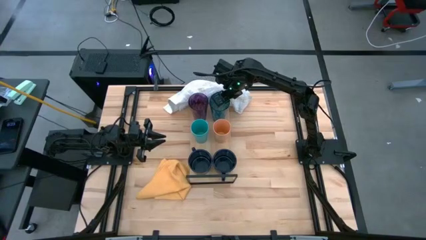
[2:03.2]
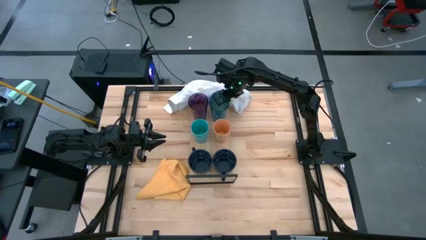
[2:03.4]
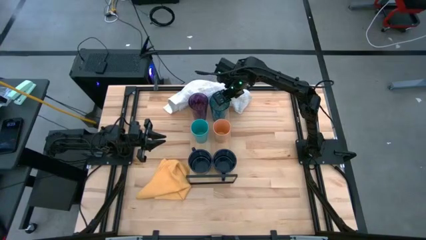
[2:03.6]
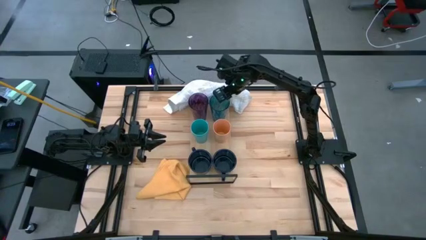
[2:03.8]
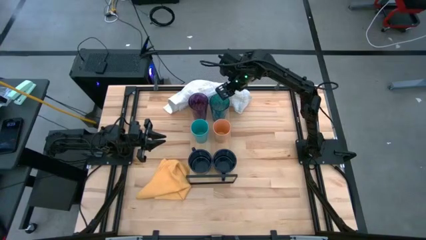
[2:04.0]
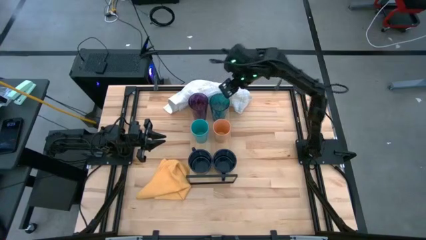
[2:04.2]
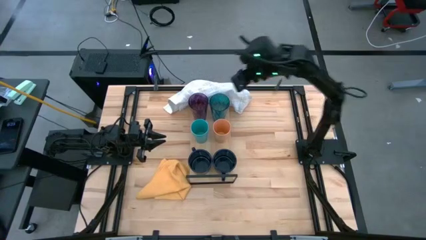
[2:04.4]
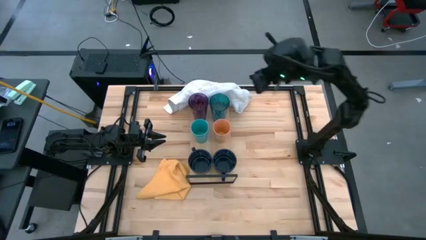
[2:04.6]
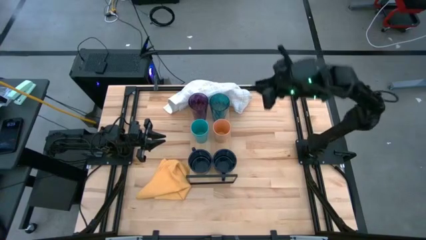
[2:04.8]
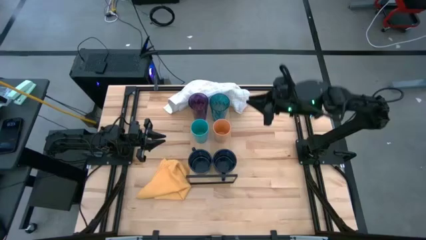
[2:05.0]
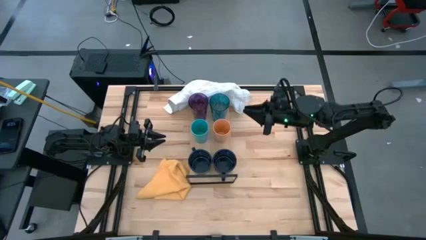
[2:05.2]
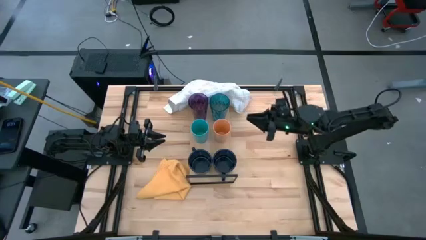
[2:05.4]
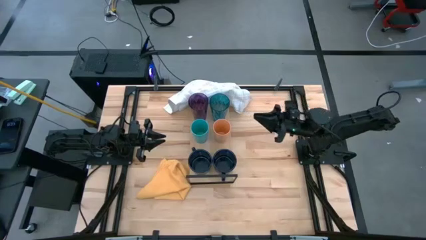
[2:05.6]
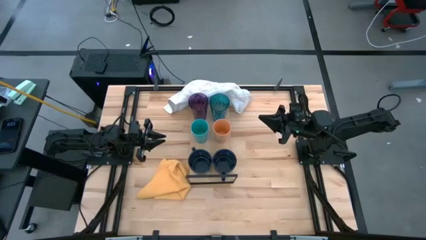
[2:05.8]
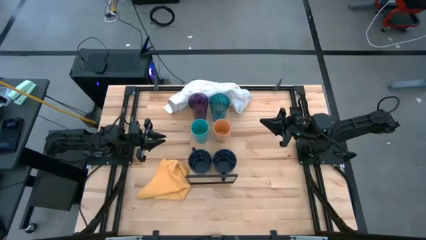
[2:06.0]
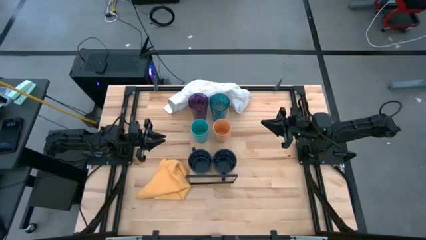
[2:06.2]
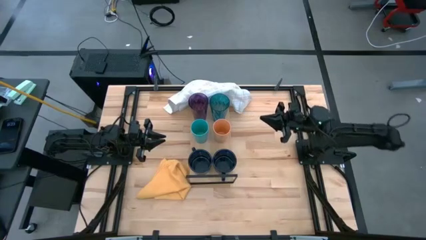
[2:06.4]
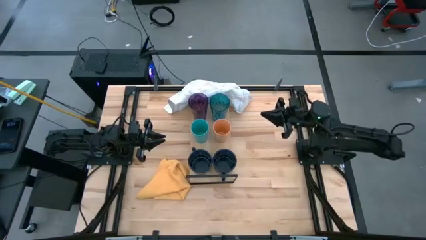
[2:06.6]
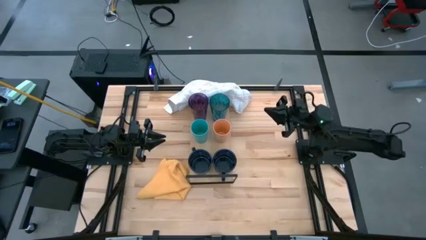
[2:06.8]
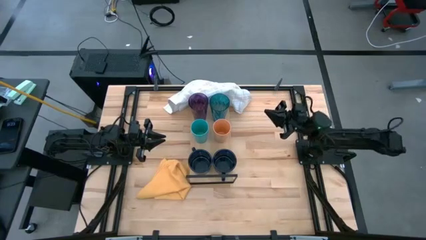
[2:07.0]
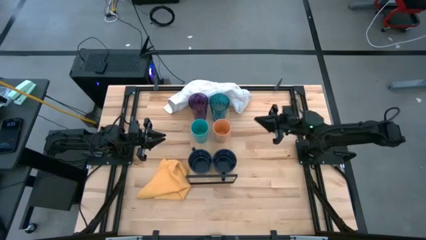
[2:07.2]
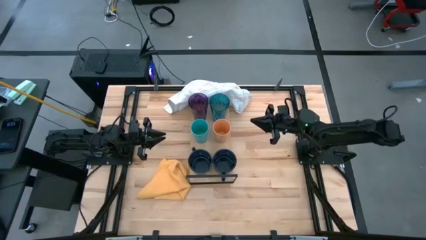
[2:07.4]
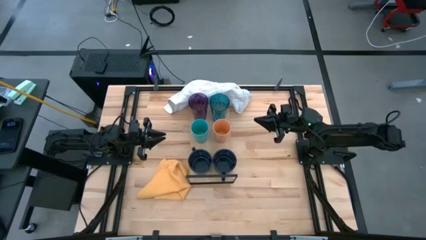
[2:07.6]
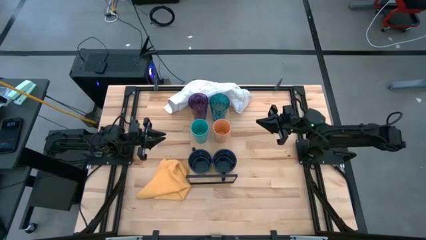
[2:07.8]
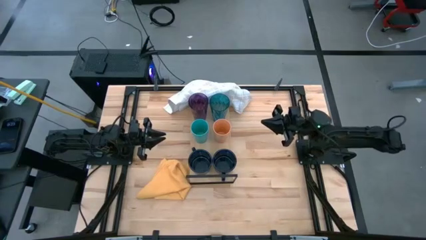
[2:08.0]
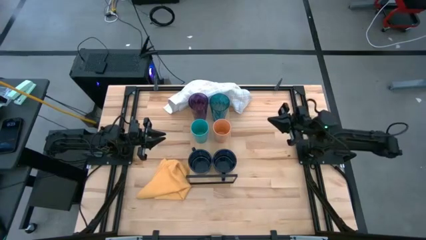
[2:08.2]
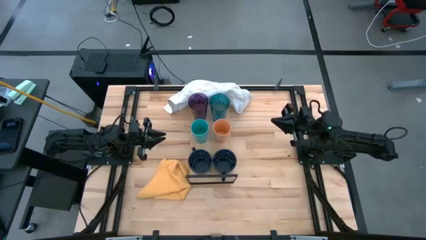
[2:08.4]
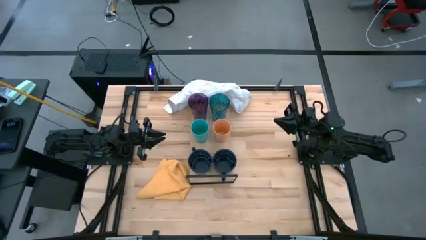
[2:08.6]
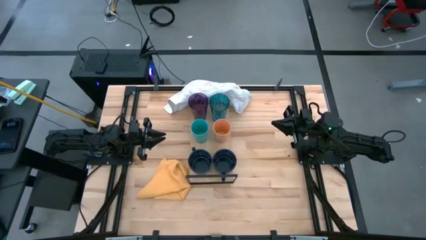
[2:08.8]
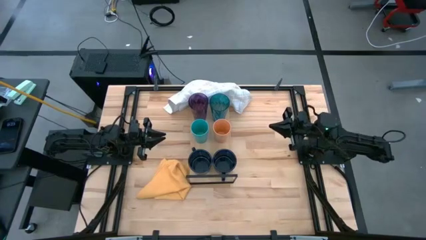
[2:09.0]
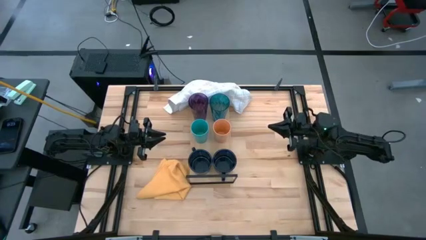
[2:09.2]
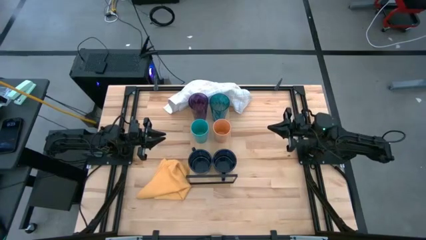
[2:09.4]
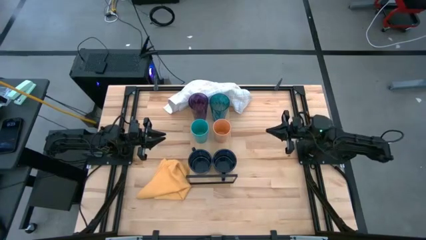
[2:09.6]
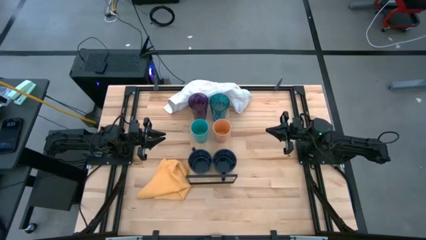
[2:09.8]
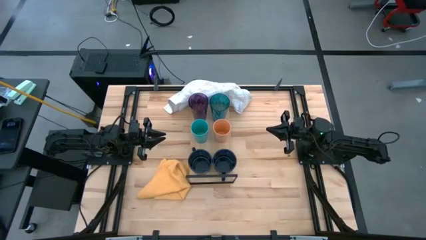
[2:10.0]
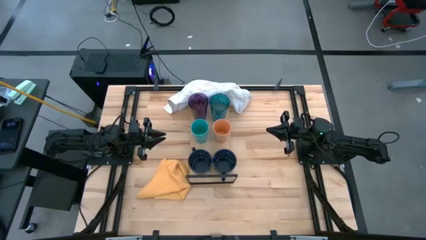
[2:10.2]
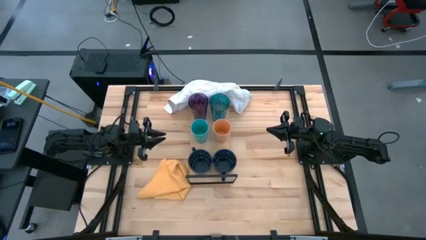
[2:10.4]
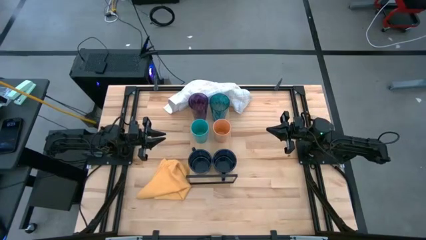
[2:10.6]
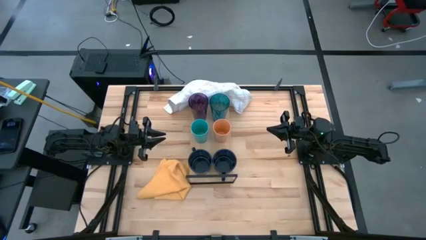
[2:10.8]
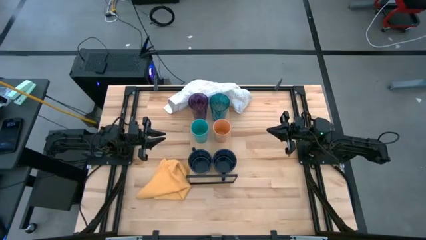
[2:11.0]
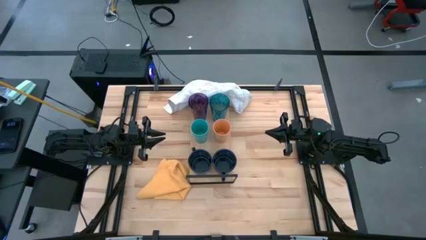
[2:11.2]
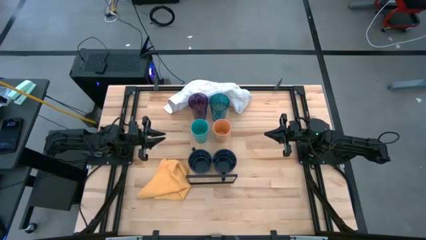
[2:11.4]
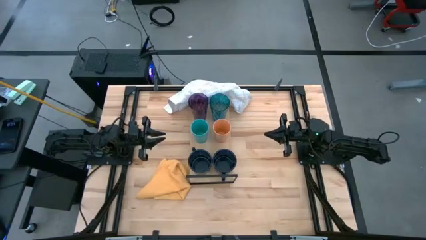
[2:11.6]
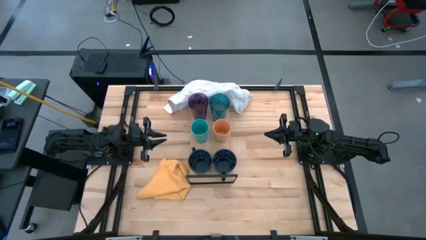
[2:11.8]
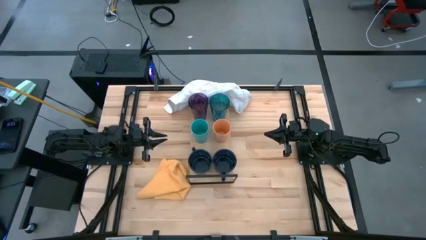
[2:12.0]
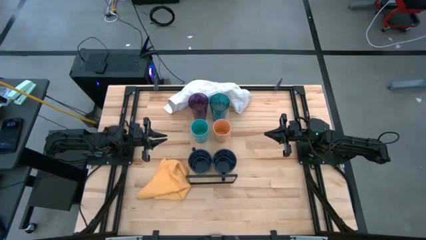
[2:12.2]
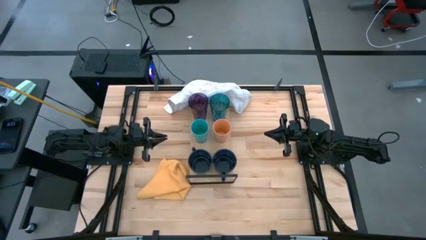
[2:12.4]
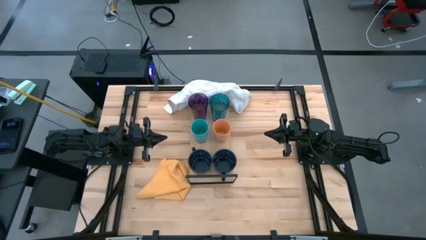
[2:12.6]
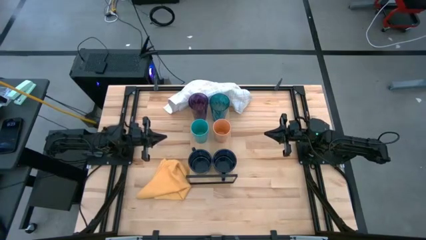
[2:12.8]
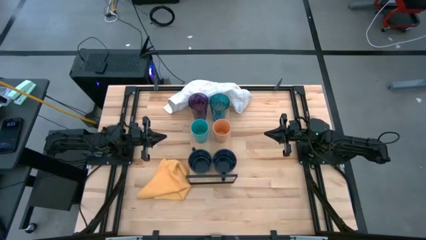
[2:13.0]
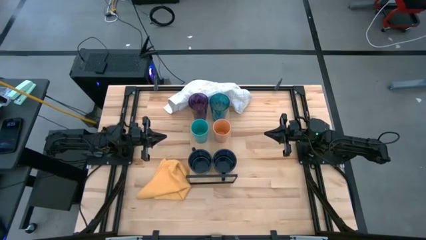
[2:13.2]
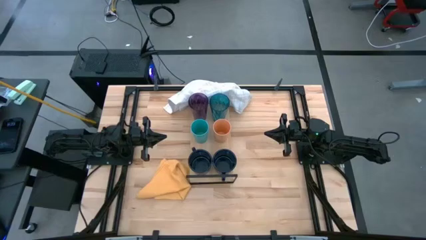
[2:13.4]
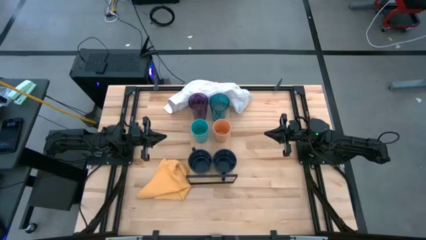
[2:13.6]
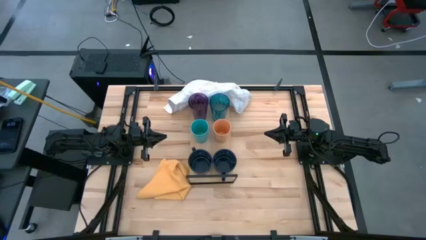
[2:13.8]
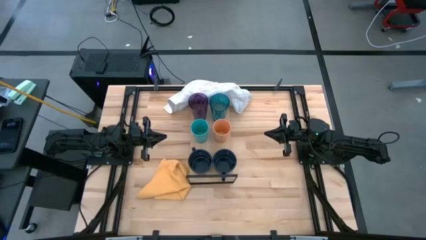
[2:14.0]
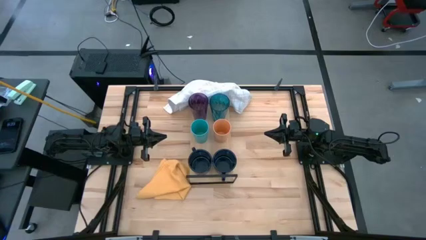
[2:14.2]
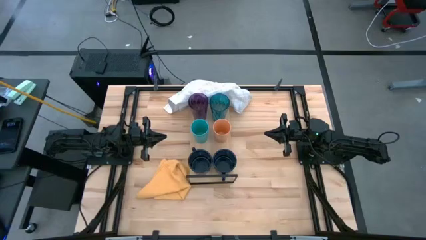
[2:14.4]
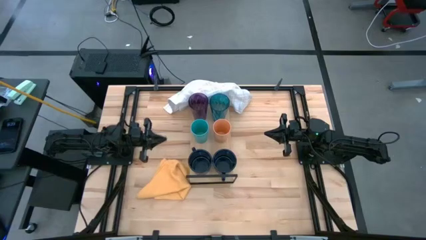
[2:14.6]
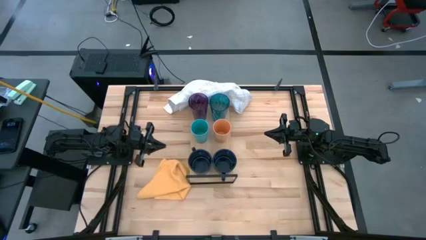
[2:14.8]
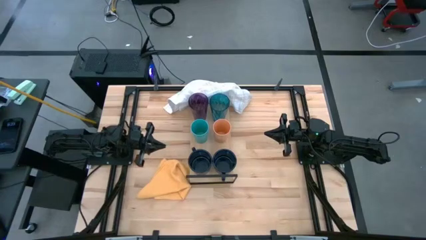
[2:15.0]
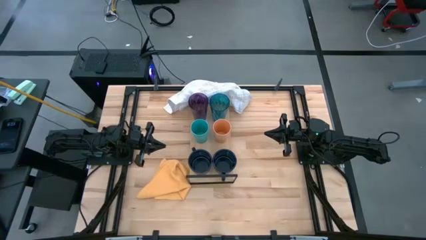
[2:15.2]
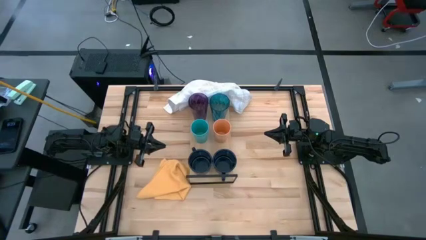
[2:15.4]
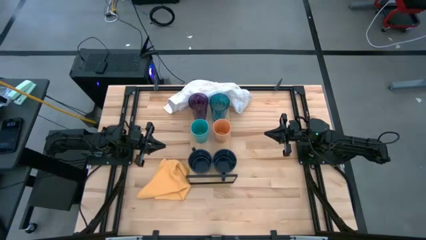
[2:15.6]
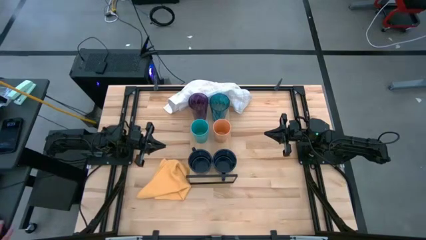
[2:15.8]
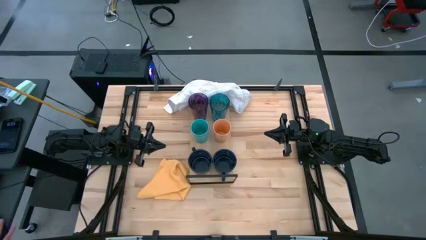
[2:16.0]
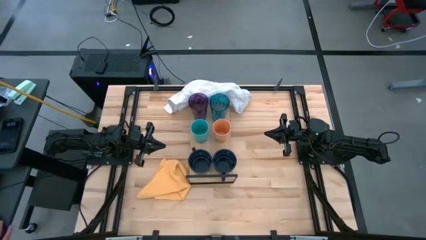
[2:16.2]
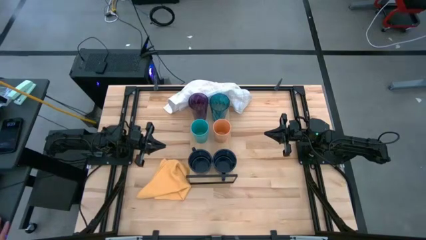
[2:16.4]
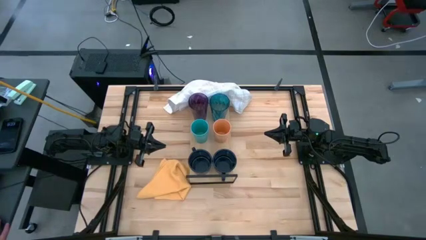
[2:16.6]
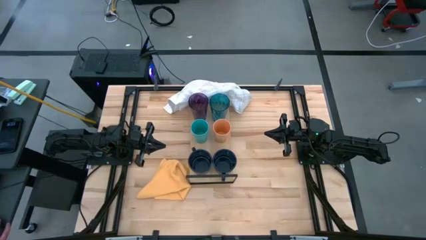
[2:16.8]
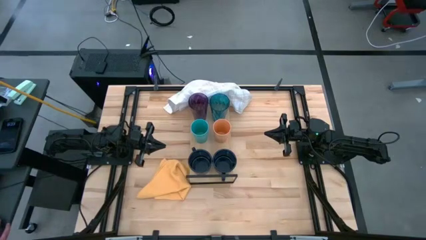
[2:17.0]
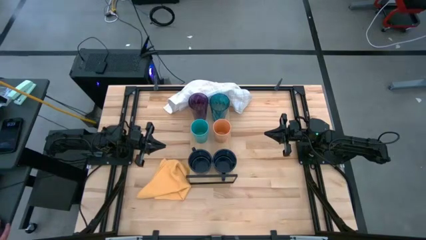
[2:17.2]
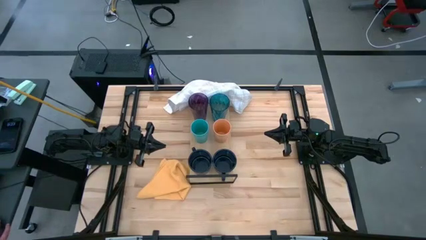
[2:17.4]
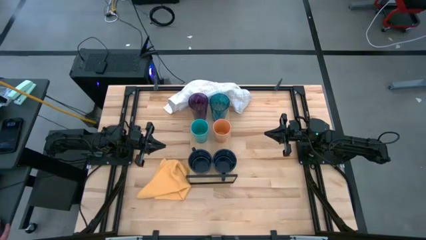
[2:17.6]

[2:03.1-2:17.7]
Task: Stack small to large cups/mugs on shelf
Return to Home Position

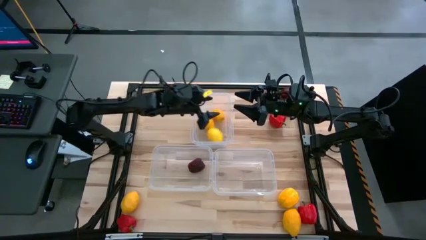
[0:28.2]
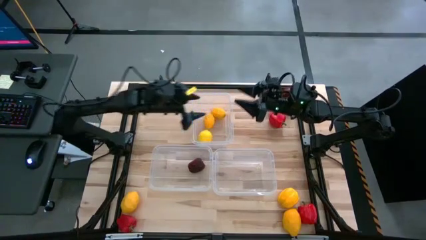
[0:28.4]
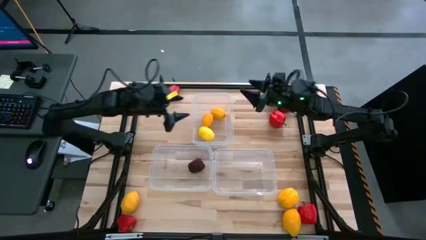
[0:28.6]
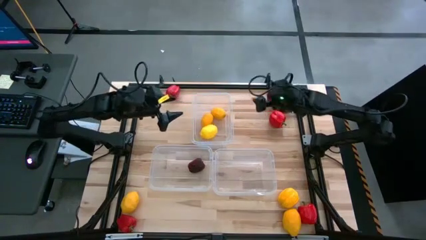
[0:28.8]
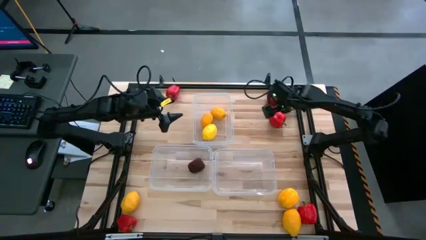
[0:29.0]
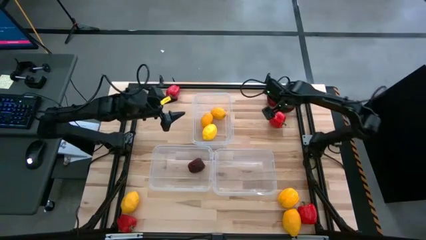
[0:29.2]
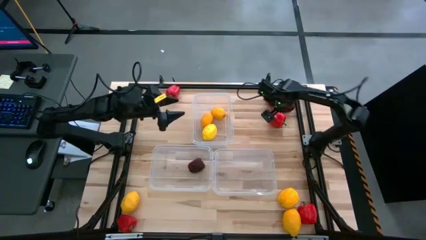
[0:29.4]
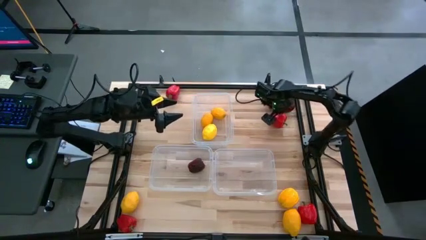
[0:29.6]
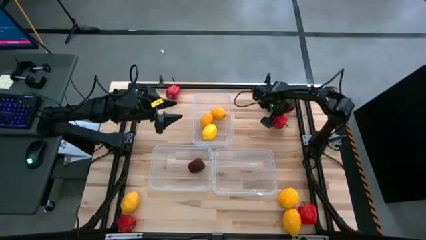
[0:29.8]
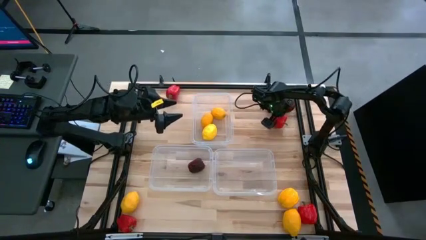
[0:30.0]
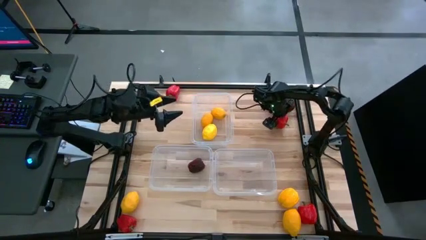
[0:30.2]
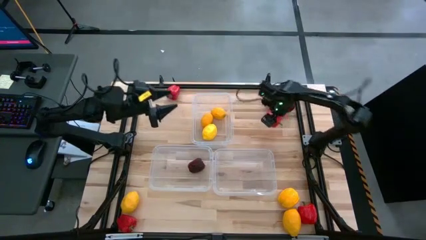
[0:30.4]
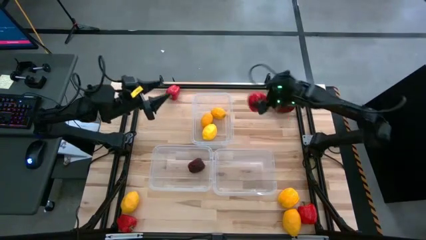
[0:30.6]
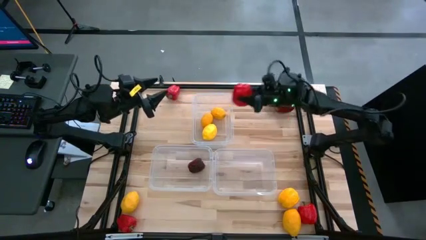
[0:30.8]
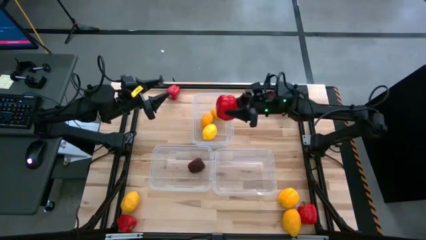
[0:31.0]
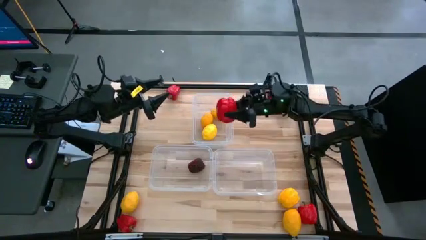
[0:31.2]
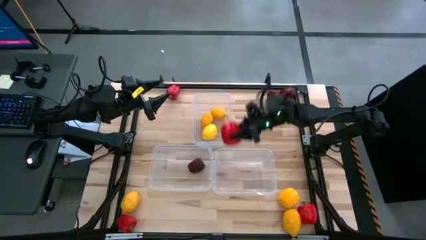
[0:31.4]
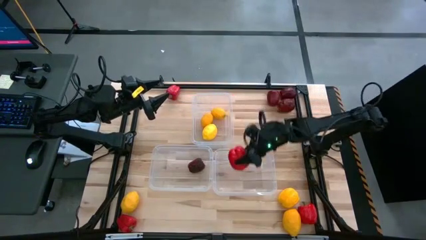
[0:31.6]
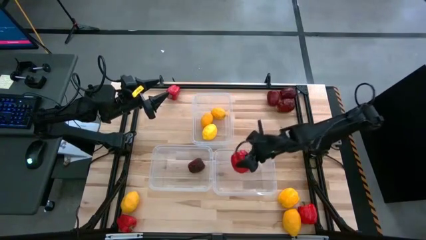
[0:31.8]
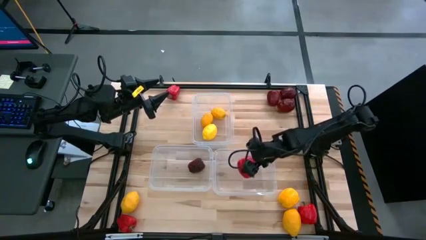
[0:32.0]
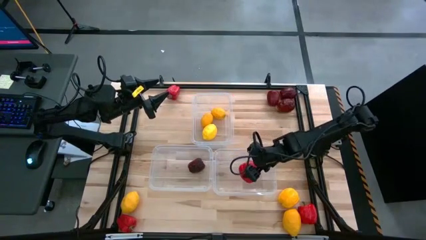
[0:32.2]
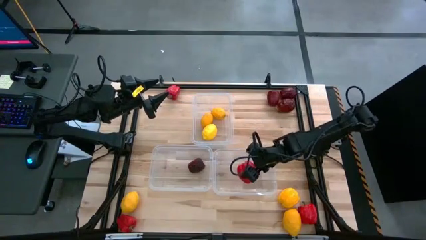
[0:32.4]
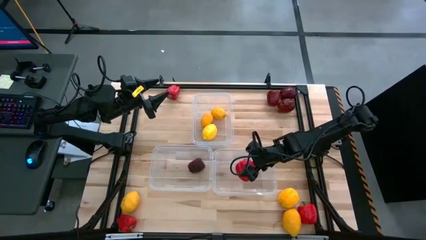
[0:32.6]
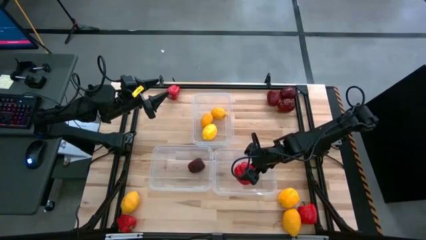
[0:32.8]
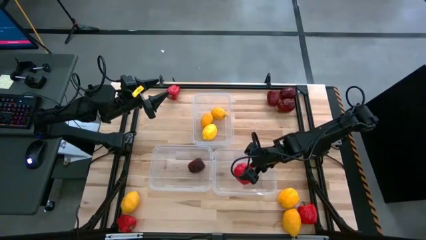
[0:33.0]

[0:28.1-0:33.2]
Task: Sort produce into baskets
Put the red bell pepper into the bottom right transparent bin
